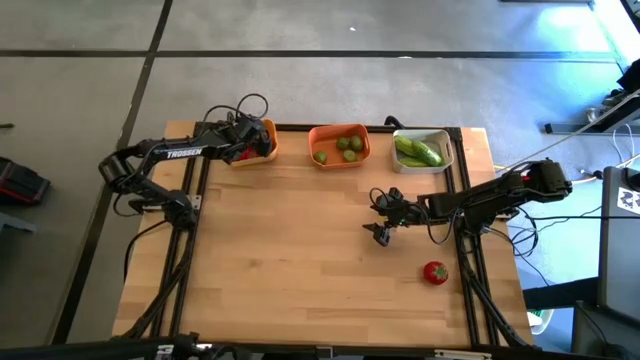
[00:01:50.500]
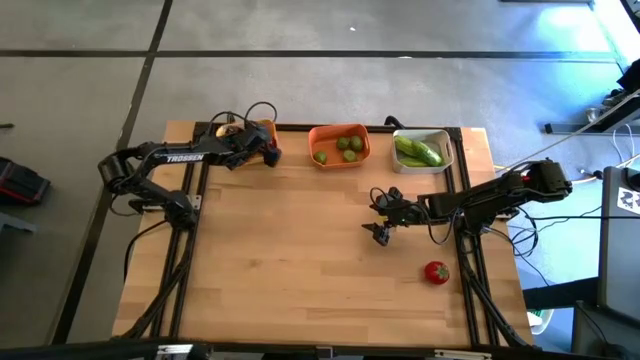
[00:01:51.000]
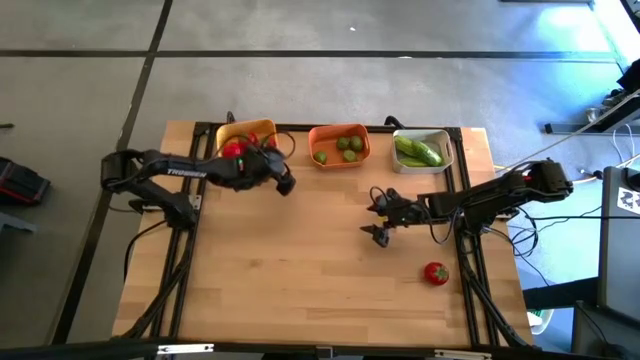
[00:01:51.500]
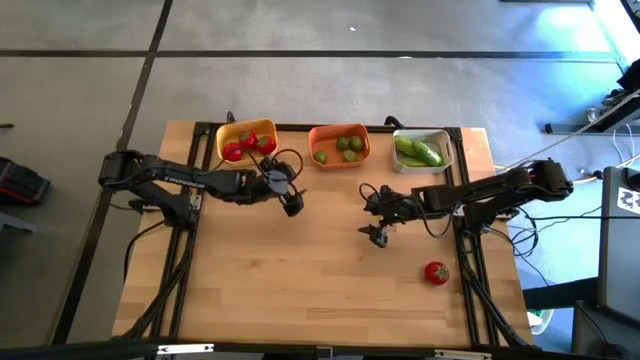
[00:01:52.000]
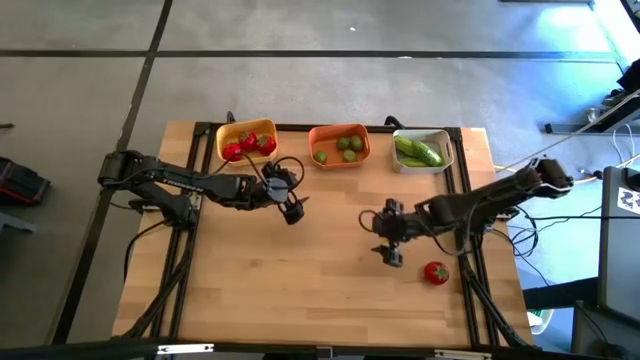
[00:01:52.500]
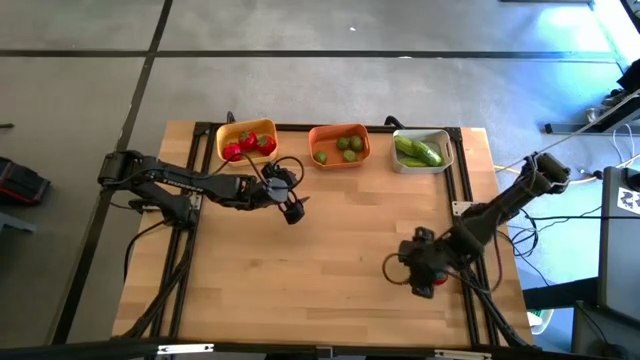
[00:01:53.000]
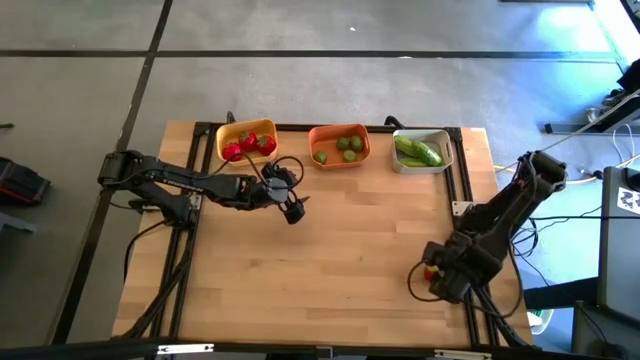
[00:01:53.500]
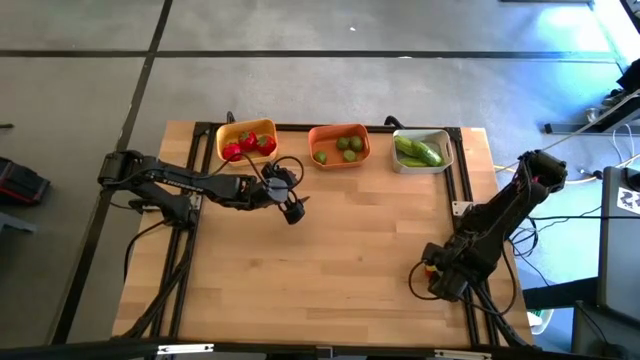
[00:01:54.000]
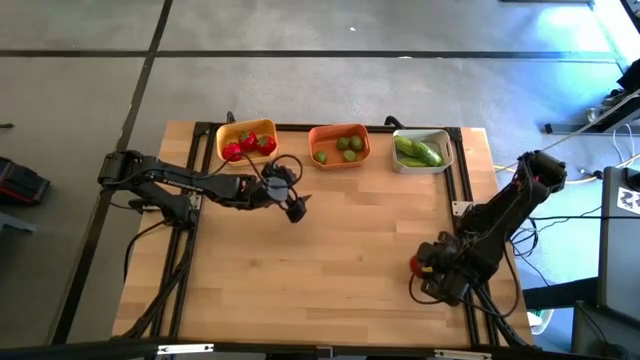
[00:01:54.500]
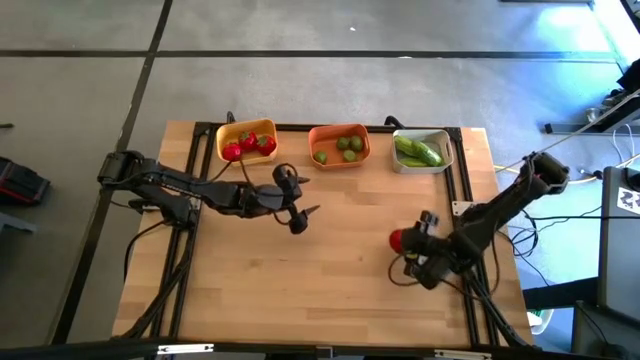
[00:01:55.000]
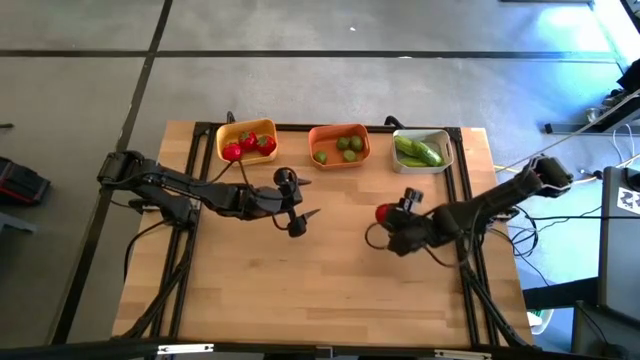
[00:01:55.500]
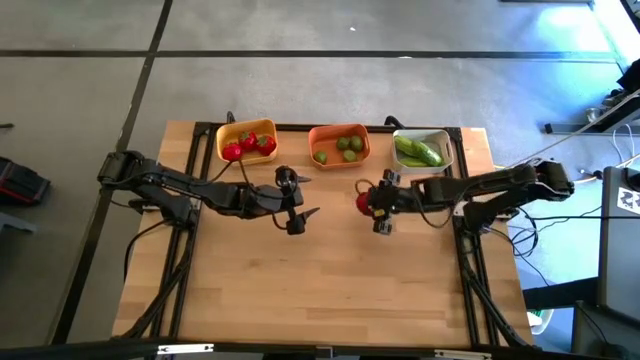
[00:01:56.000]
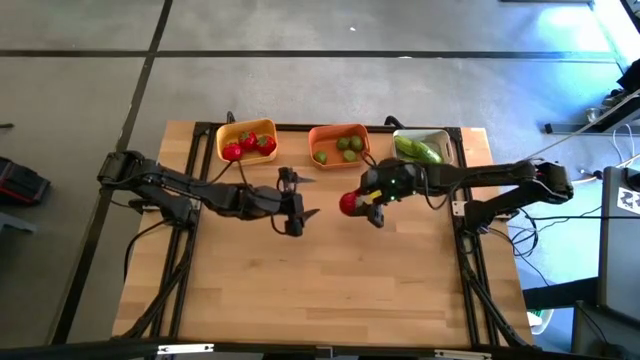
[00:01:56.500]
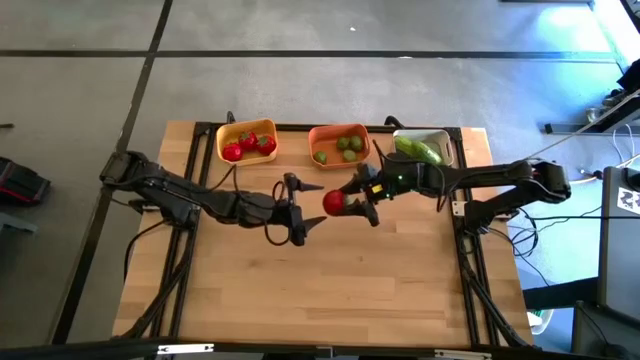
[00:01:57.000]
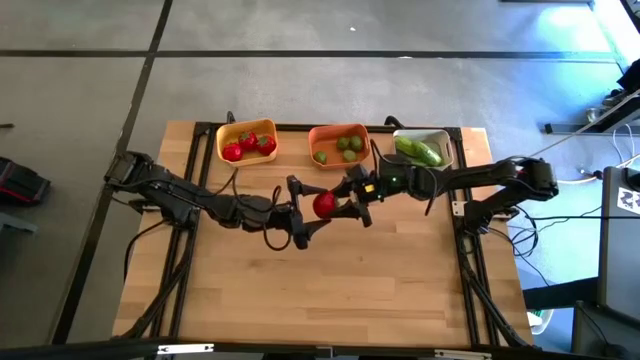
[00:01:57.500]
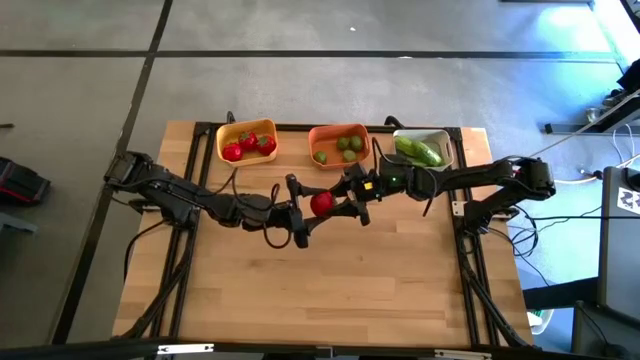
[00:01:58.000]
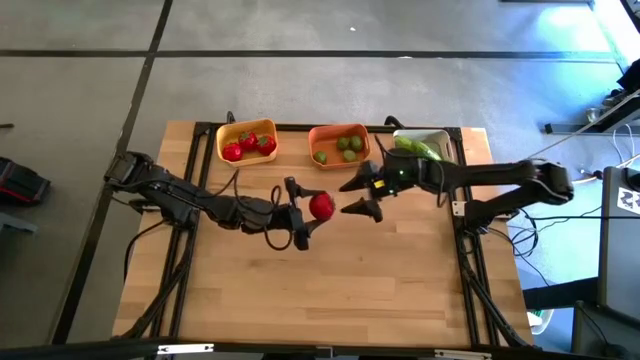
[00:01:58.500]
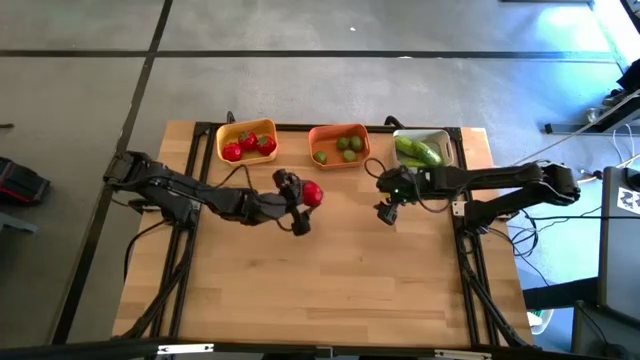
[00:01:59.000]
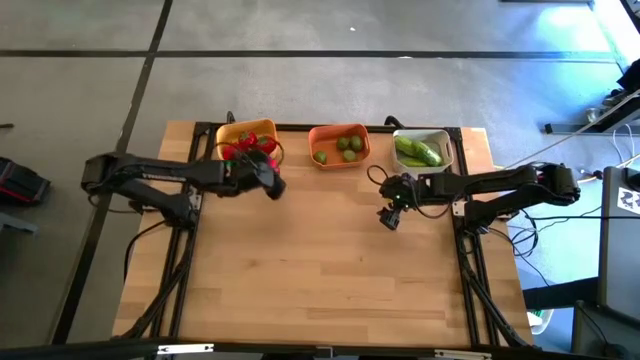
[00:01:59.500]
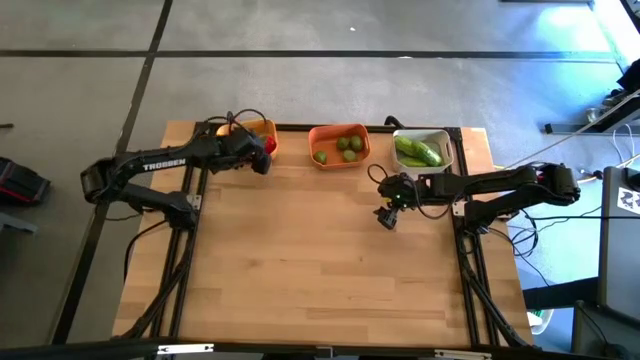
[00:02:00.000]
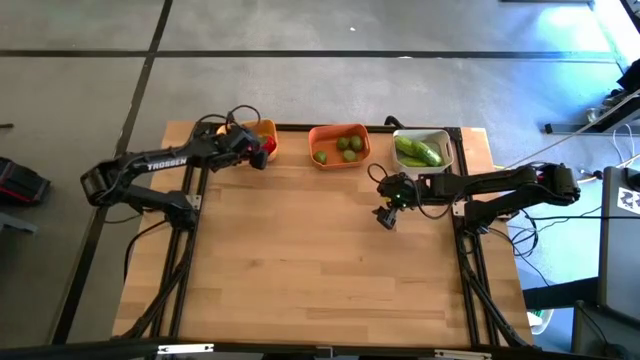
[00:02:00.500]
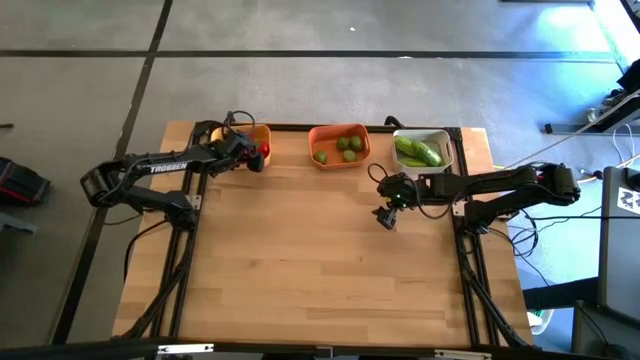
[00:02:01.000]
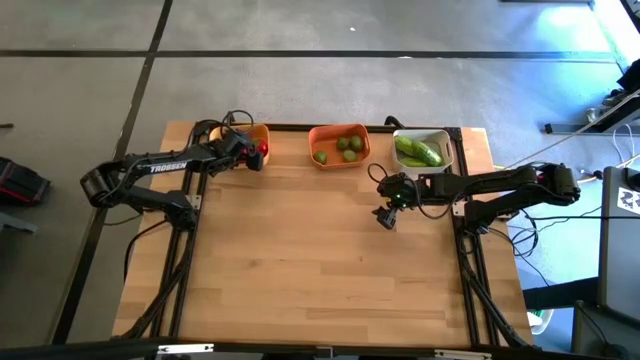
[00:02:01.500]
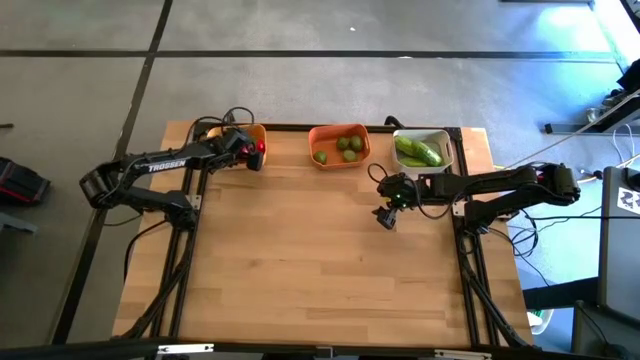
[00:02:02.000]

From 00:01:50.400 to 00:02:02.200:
Task: Sort produce into baskets
Put the tomato into the yellow bin

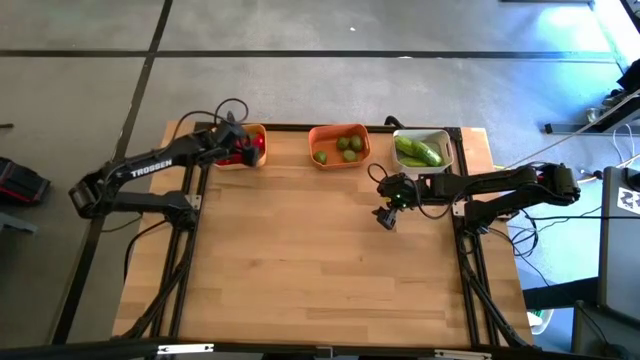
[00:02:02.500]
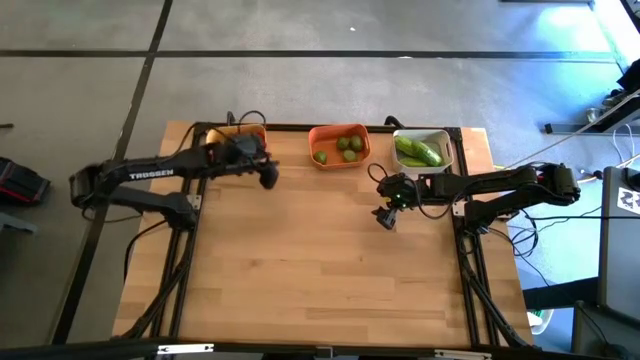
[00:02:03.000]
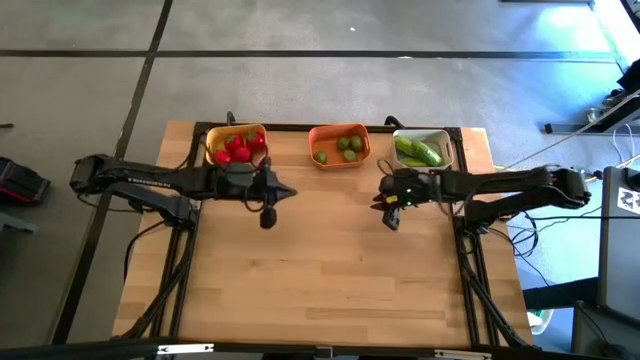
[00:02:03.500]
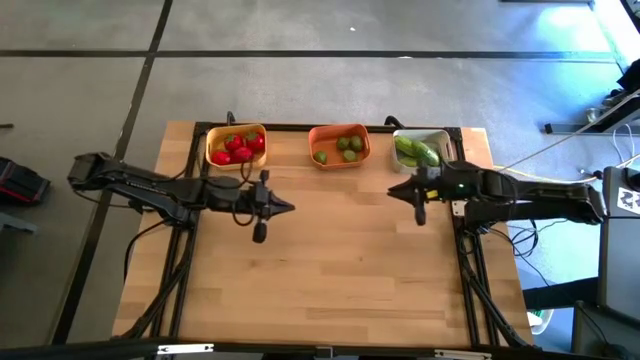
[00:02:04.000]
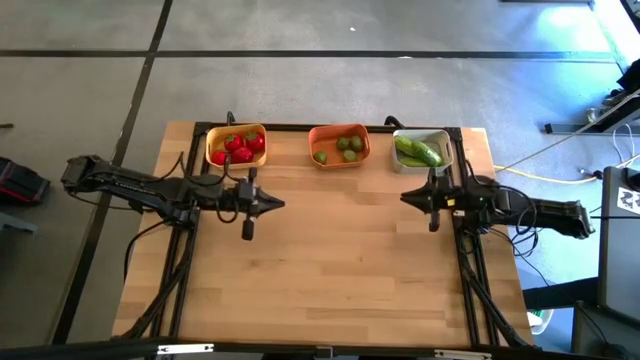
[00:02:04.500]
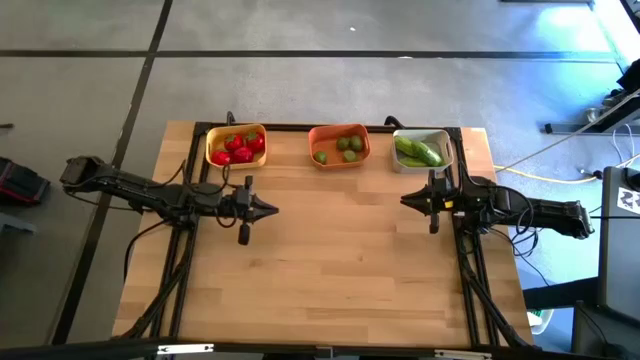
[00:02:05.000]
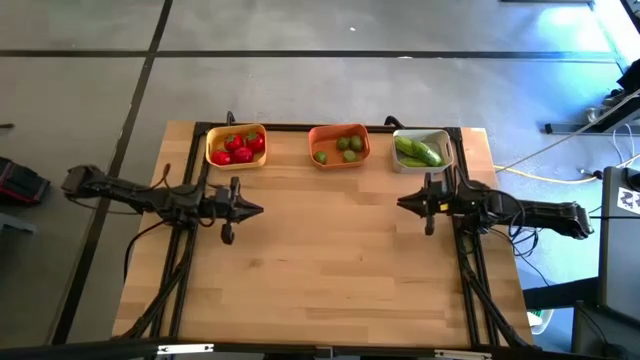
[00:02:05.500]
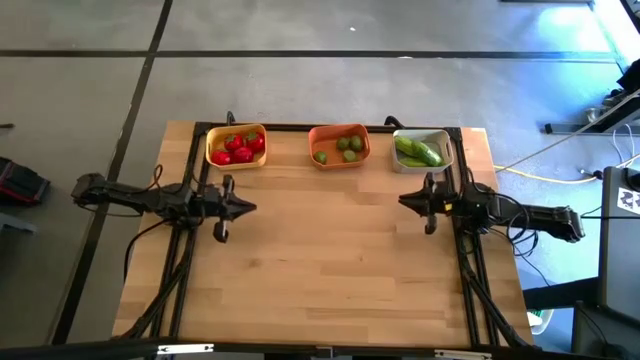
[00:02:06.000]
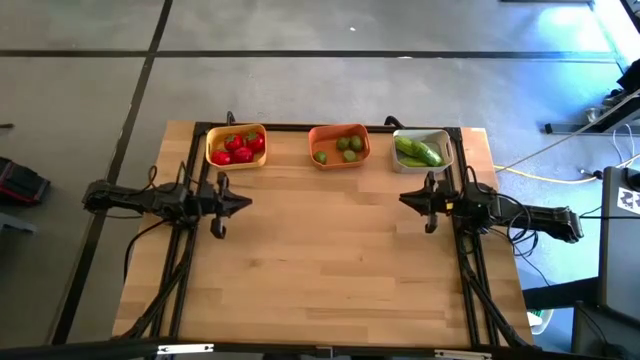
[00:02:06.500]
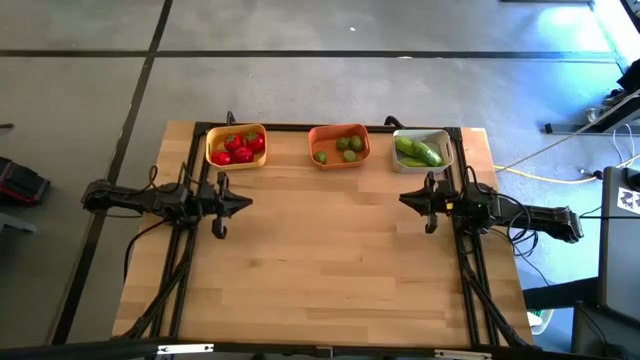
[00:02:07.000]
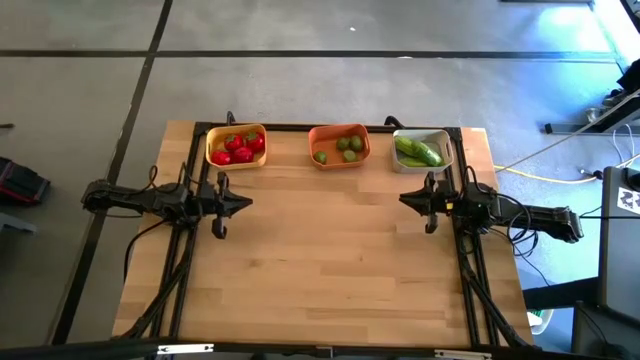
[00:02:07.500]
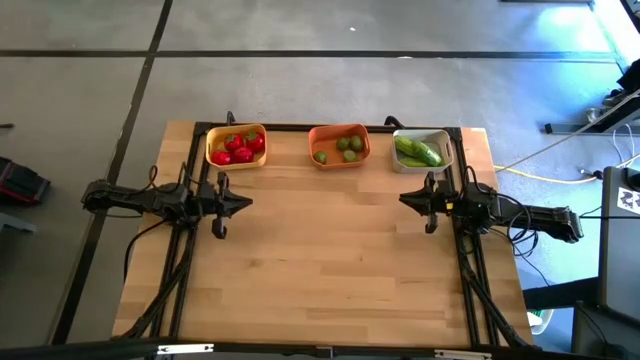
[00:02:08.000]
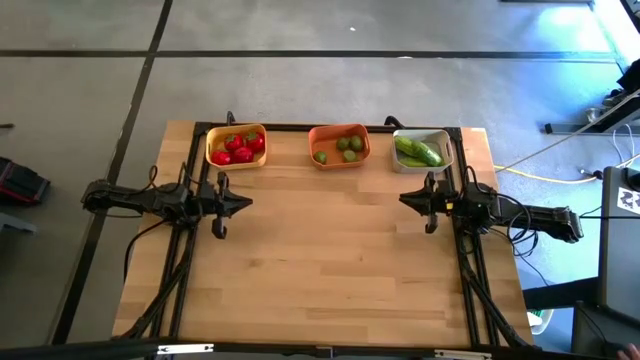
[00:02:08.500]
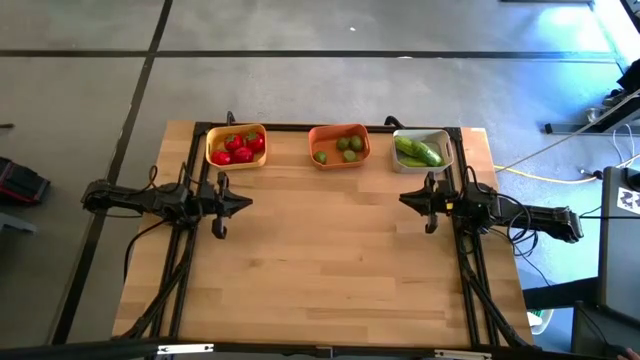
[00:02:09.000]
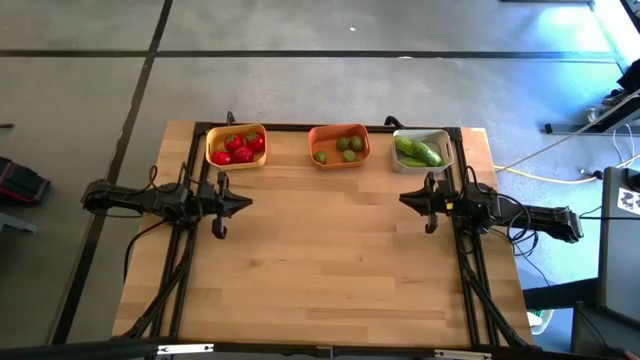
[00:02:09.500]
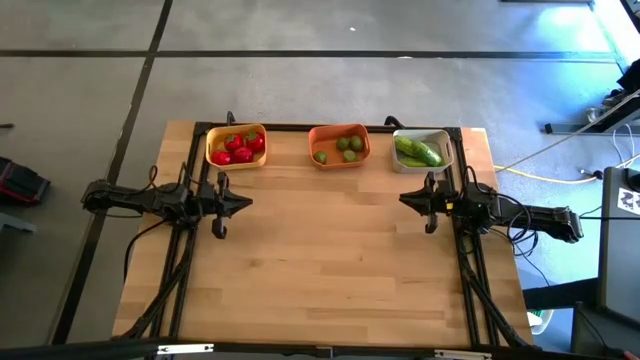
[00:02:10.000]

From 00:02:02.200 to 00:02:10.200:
Return to Home Position
